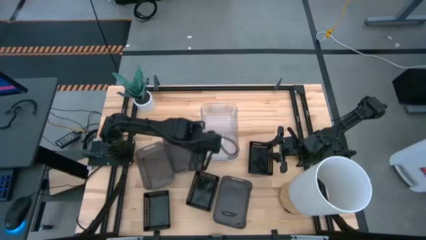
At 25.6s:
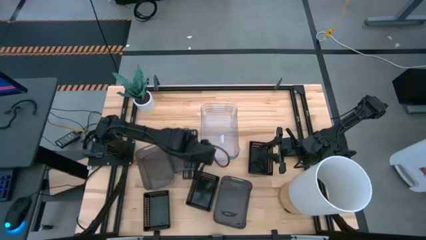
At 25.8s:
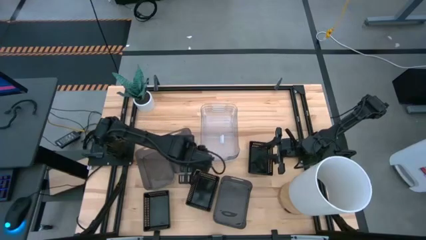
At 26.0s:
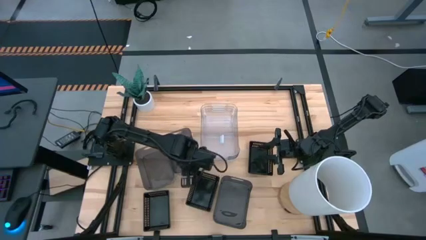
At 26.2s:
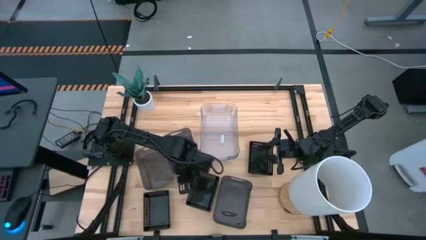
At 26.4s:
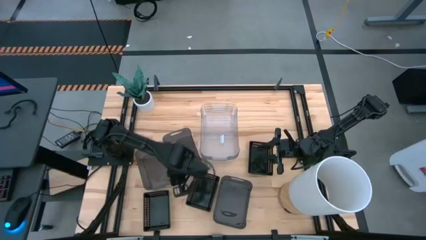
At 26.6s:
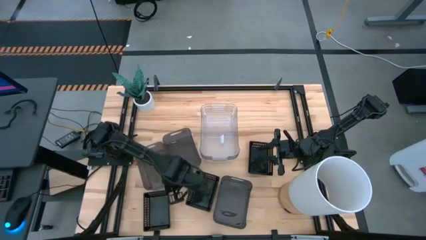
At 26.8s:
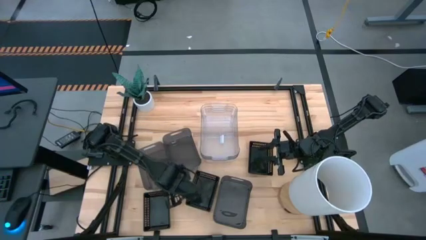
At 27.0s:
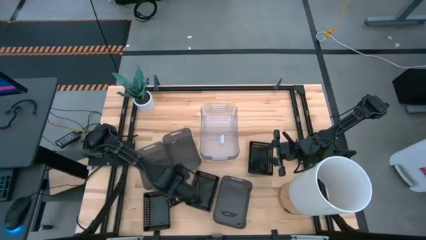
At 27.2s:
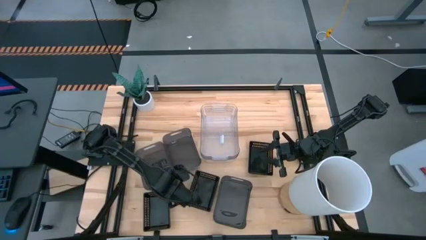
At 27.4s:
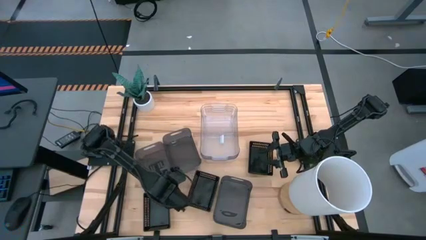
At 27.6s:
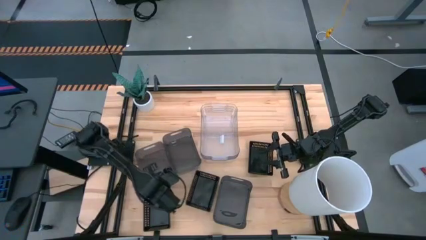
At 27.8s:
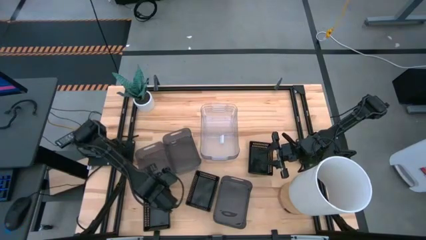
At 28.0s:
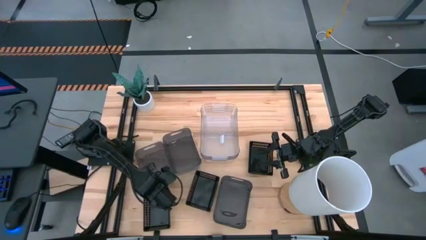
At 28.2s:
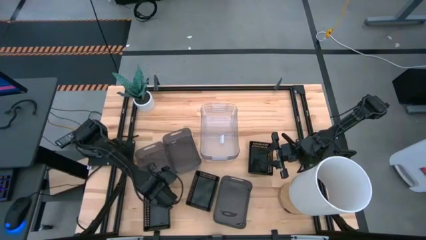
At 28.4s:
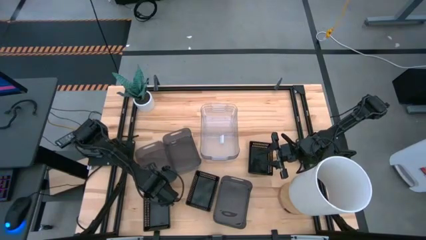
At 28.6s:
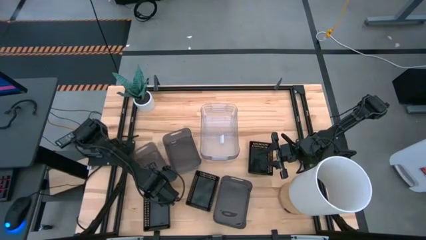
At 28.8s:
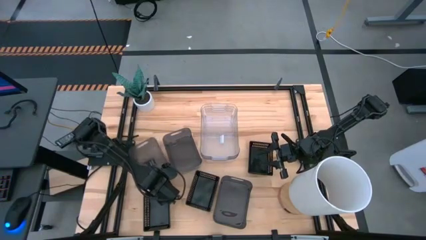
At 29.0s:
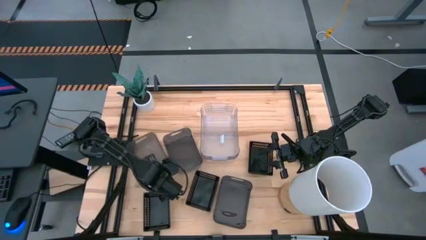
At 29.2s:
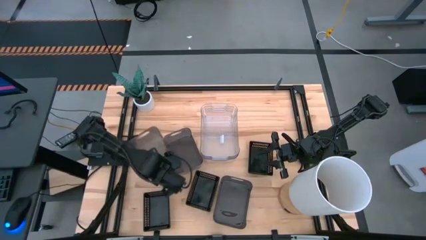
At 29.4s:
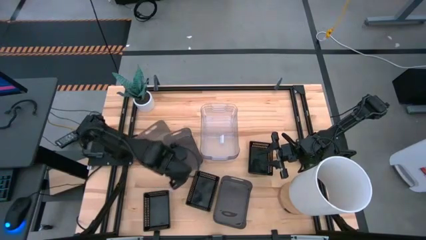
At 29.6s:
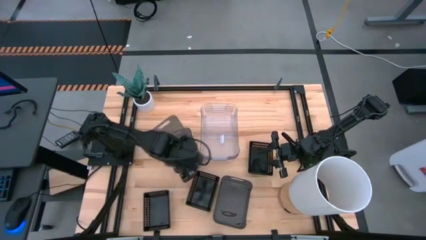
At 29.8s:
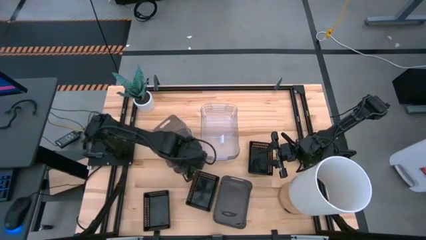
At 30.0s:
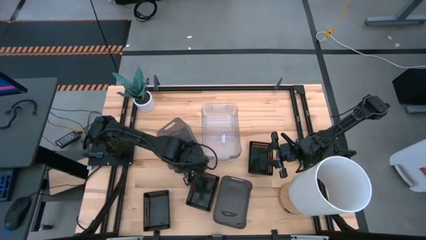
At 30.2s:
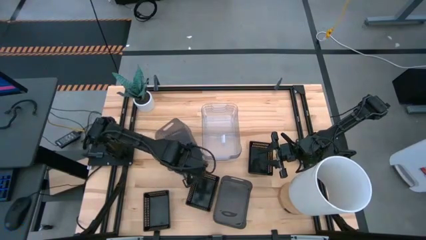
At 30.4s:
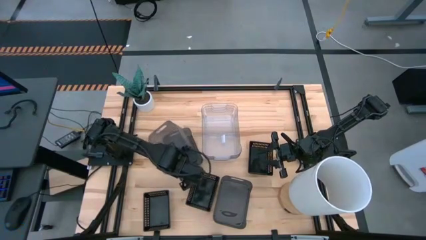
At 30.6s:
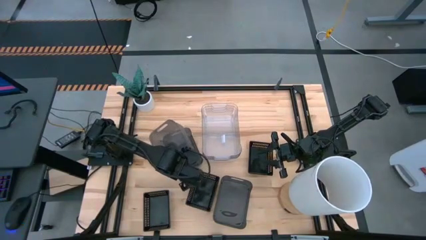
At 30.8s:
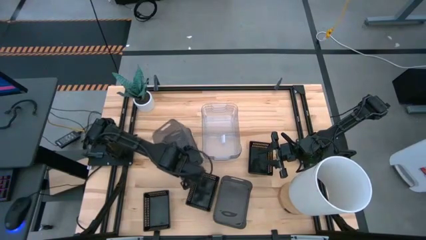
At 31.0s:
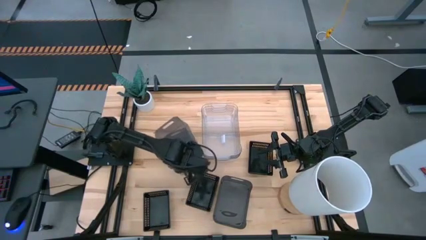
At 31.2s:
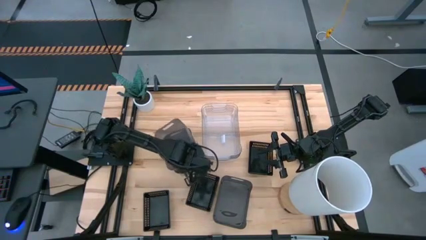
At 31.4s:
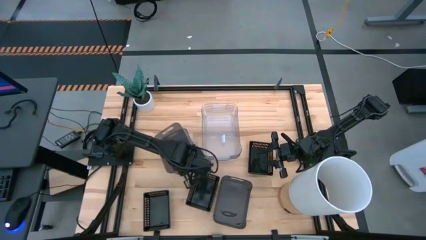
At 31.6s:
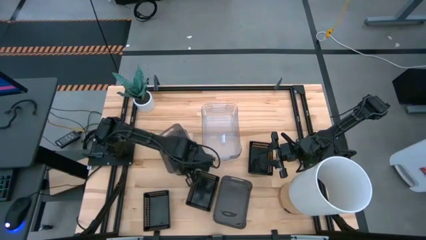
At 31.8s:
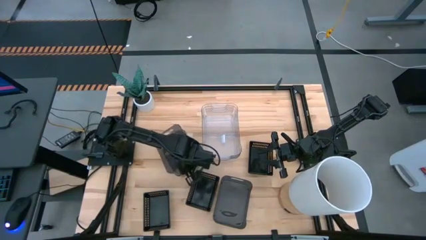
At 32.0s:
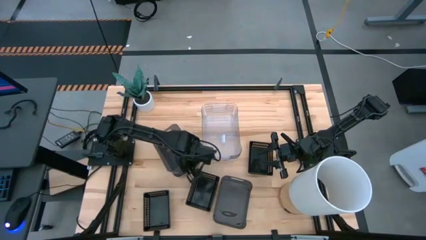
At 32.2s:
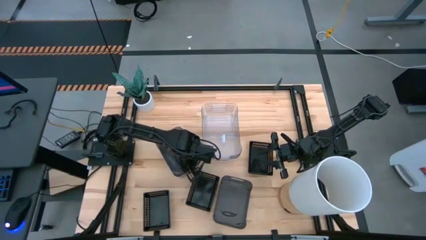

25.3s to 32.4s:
Stack the left black bin on the middle black bin

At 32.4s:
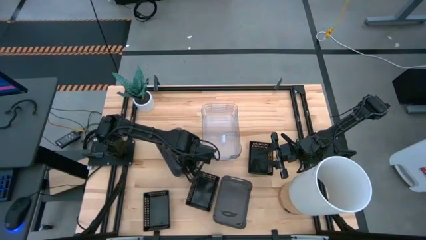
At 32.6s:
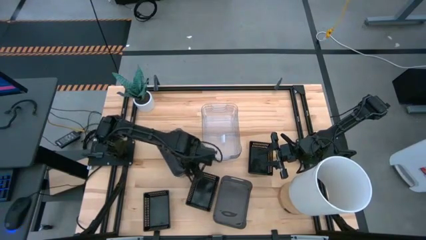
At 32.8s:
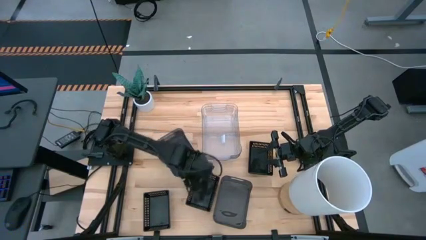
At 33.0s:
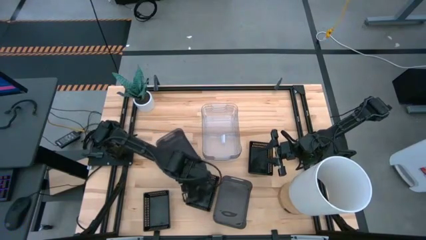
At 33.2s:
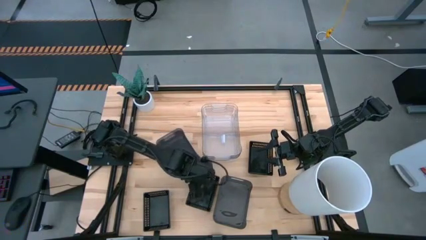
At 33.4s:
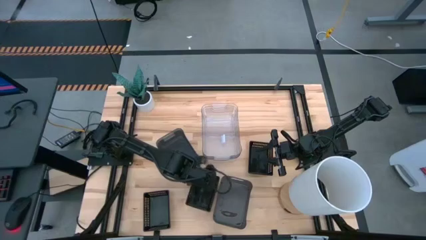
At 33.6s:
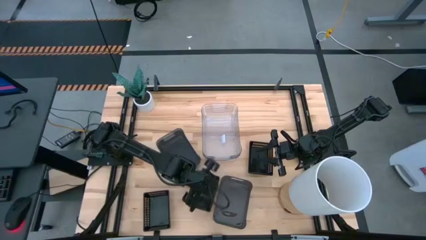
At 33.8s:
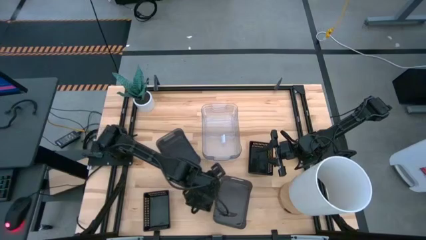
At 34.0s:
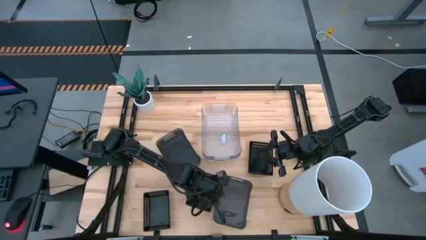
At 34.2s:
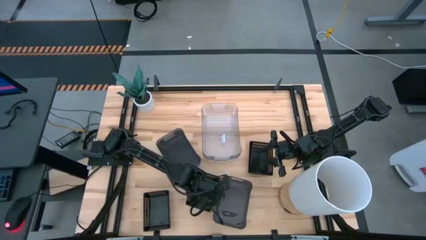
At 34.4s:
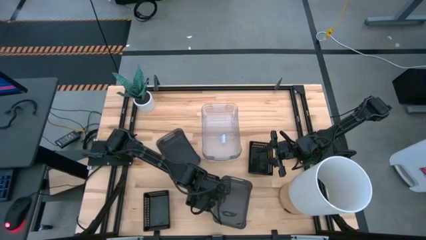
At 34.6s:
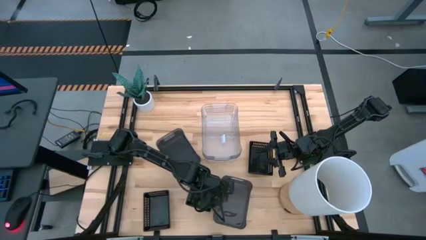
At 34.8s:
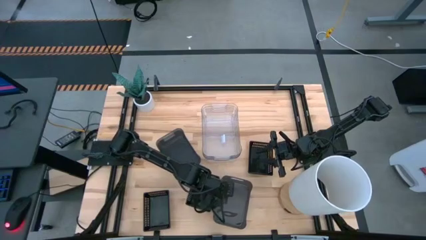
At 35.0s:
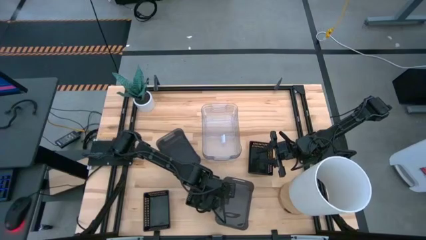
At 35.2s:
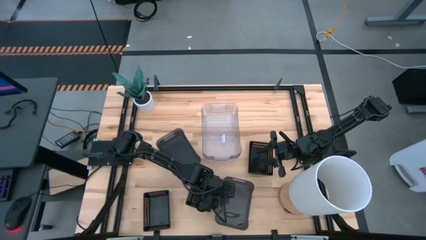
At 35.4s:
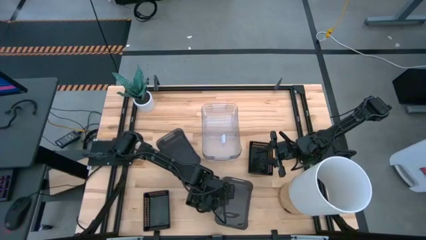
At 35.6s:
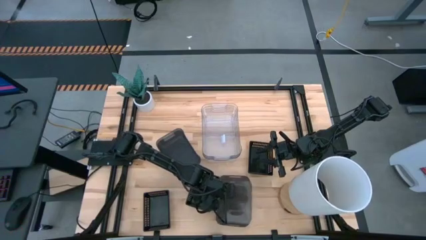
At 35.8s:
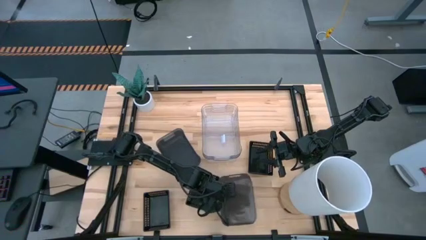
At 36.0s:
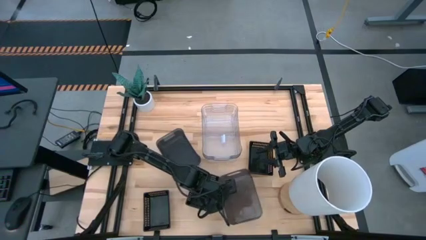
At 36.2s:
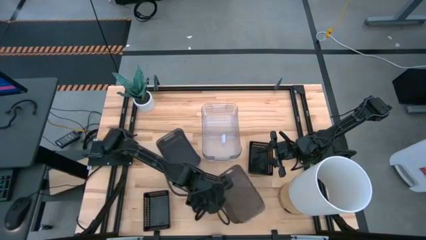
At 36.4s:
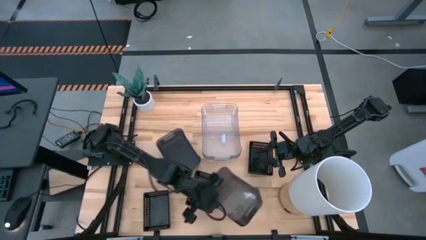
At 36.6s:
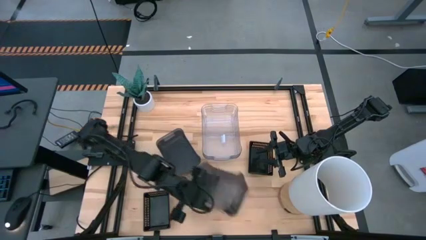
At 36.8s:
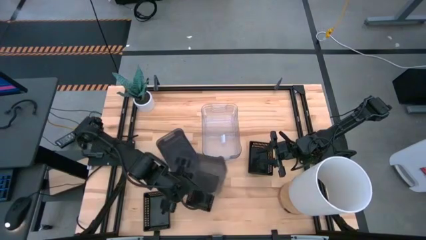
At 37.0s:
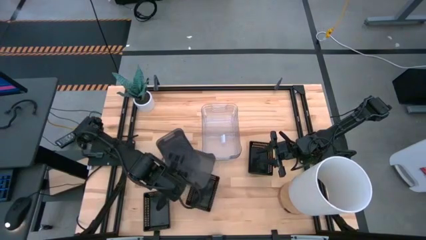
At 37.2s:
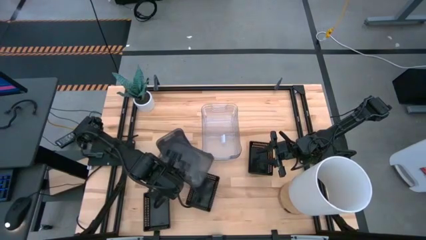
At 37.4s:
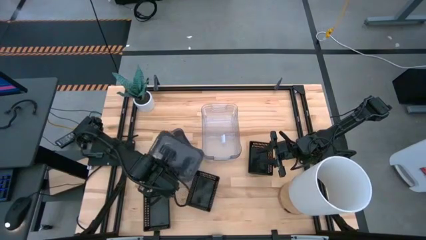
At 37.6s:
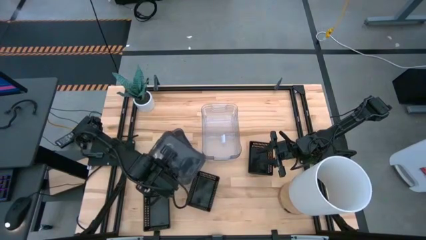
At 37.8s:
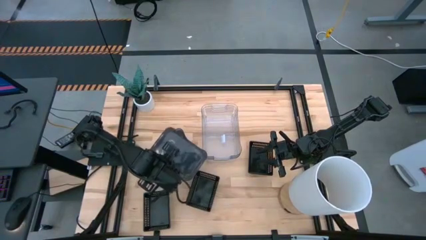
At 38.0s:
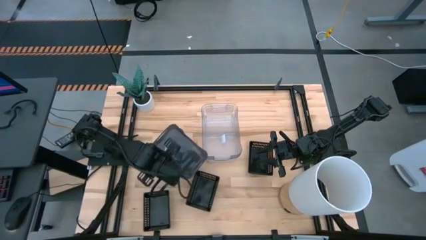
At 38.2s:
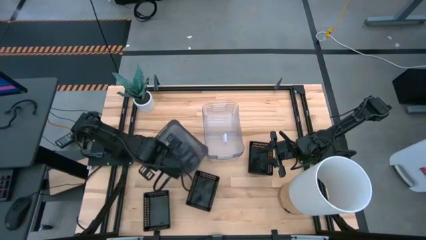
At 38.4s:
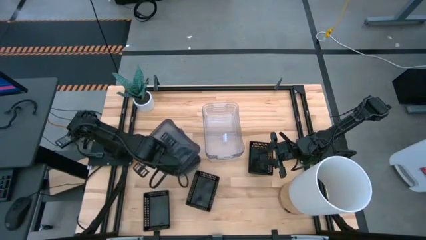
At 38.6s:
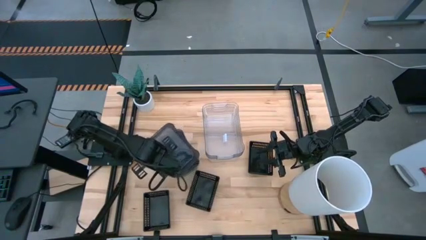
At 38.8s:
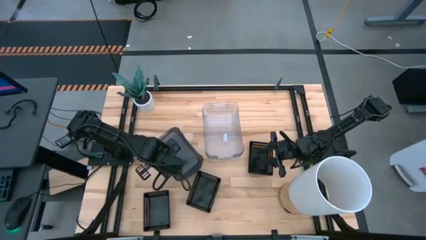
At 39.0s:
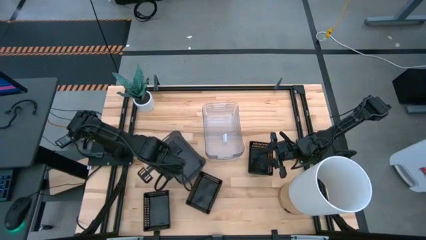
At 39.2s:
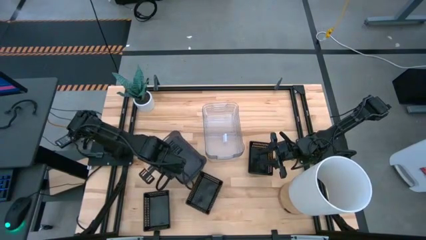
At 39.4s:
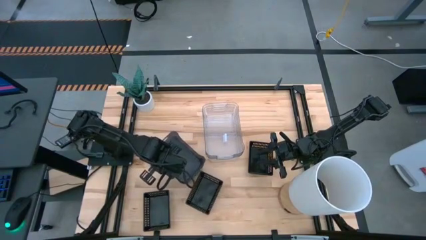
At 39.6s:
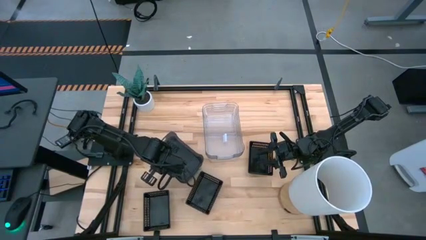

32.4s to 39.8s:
Stack the right black bin on the left black bins

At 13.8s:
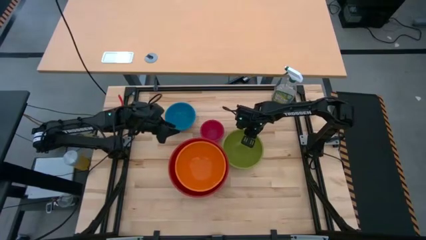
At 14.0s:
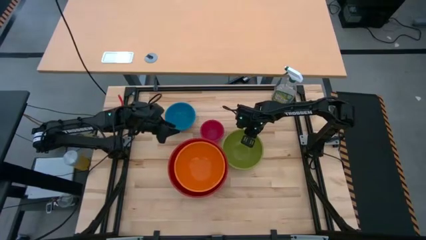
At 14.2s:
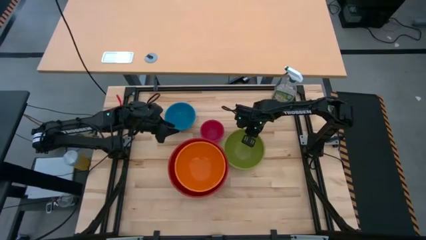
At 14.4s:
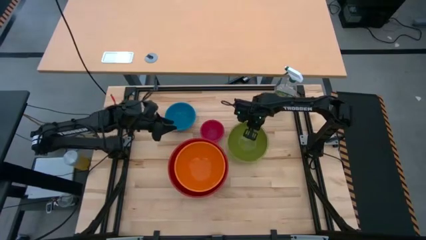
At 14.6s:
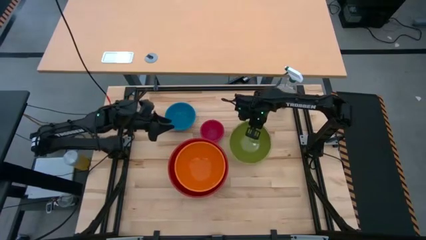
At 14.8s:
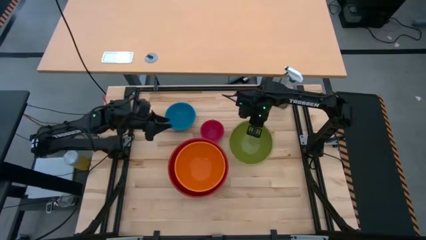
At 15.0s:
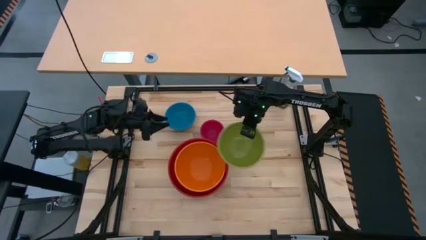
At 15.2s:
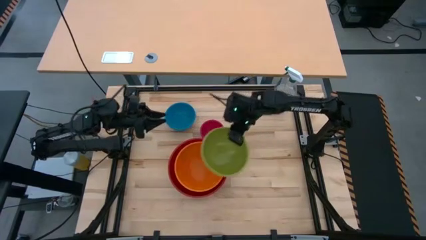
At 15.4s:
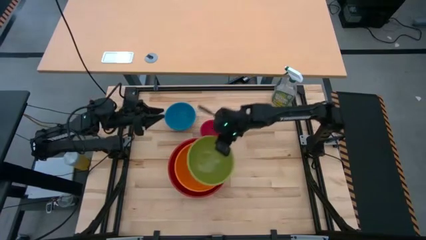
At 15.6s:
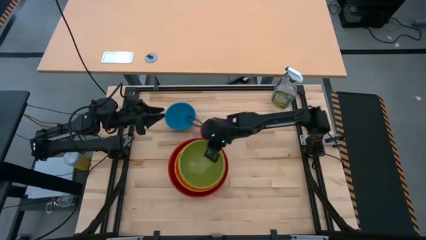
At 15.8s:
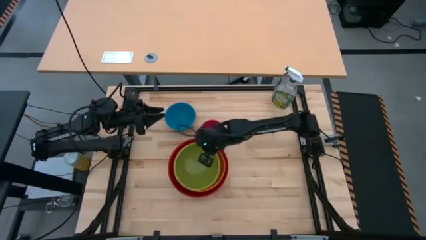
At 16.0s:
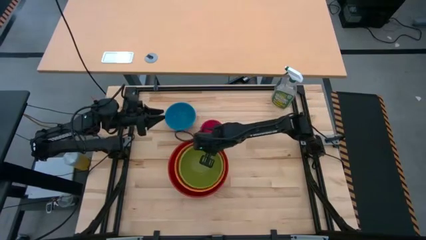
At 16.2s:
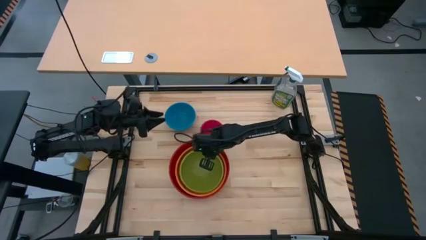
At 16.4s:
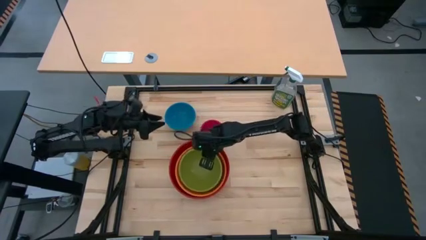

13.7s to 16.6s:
Stack the green bowl on top of the orange bowl
